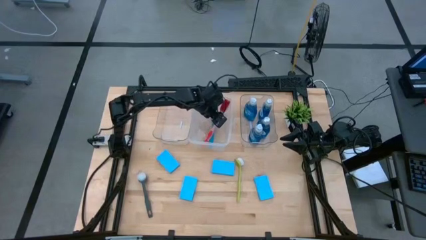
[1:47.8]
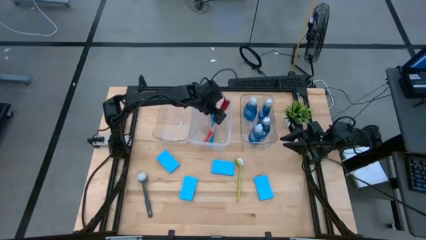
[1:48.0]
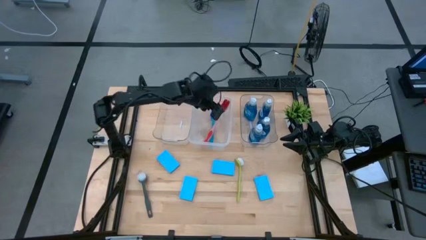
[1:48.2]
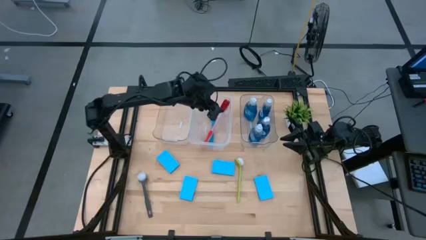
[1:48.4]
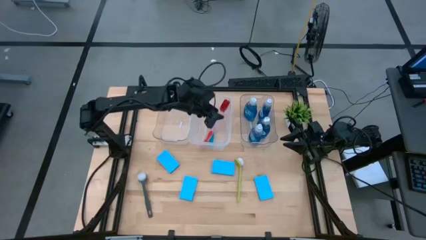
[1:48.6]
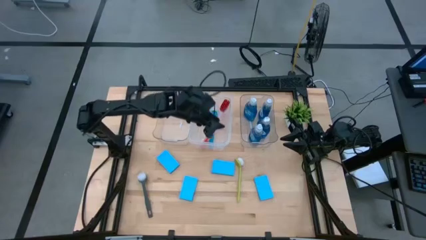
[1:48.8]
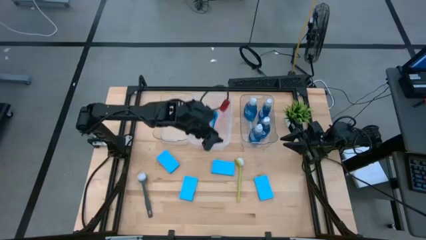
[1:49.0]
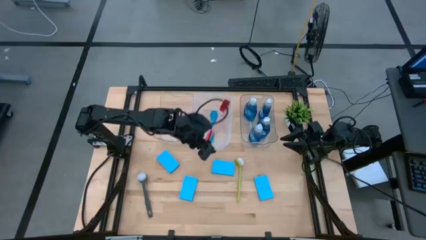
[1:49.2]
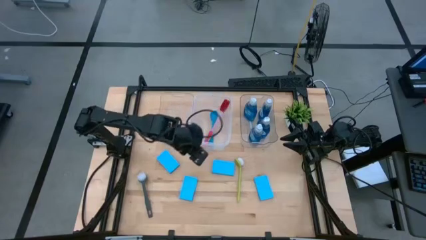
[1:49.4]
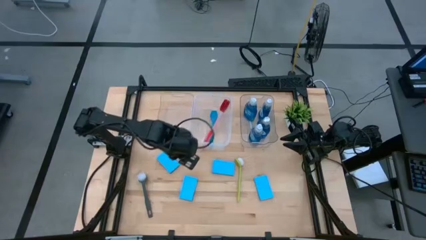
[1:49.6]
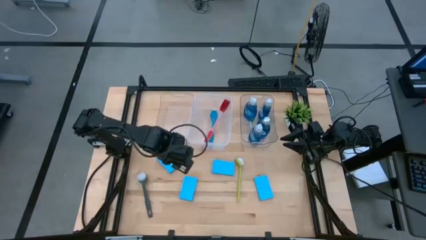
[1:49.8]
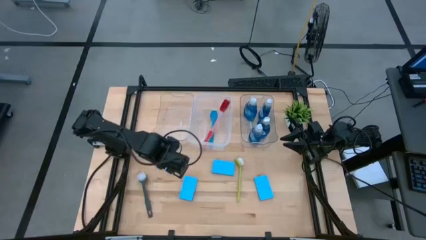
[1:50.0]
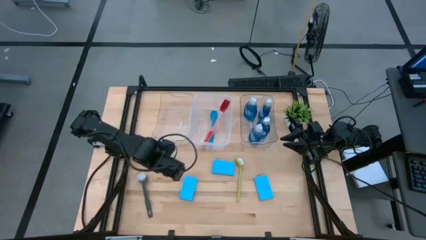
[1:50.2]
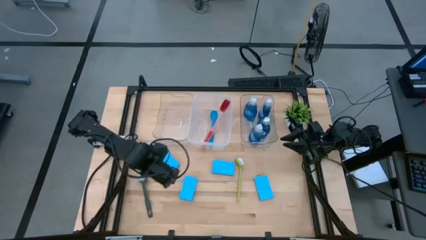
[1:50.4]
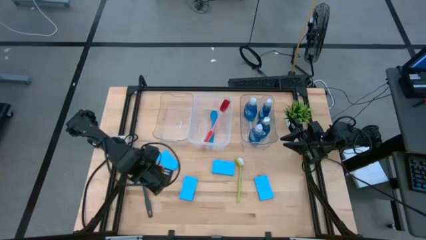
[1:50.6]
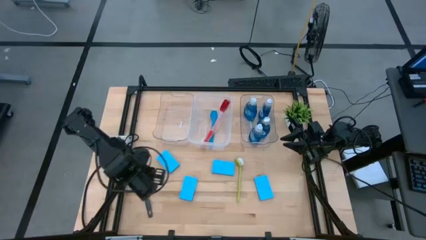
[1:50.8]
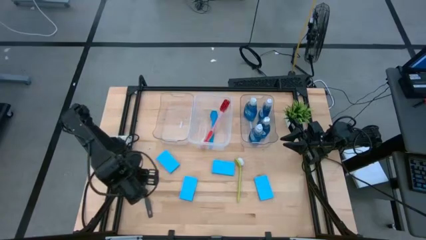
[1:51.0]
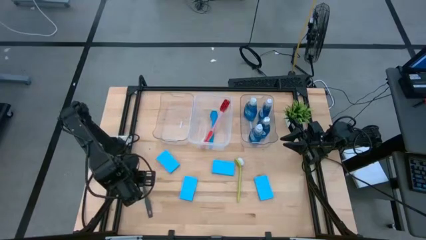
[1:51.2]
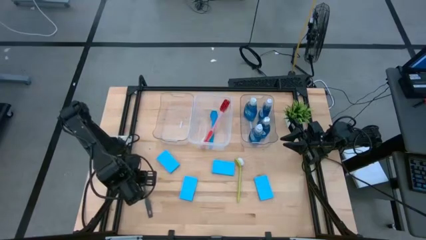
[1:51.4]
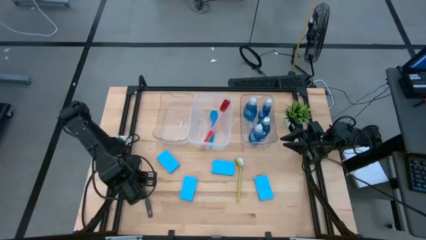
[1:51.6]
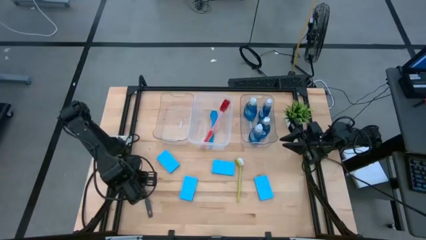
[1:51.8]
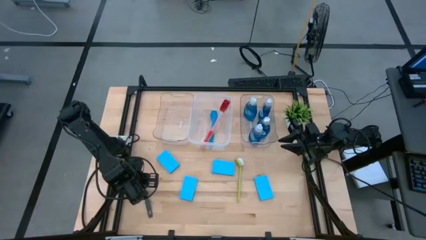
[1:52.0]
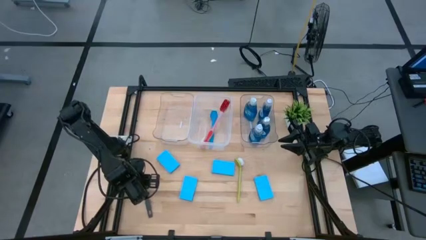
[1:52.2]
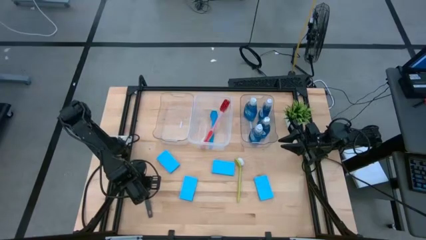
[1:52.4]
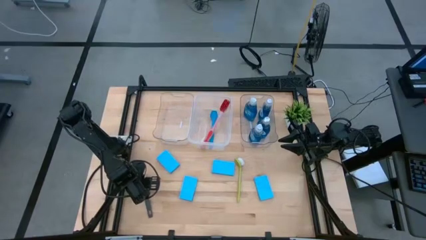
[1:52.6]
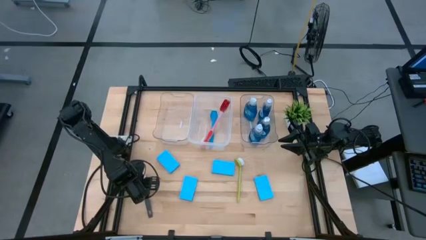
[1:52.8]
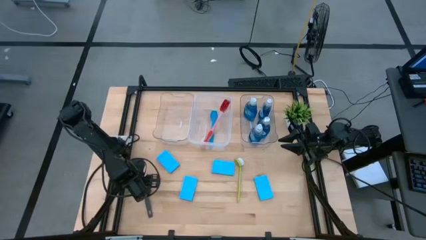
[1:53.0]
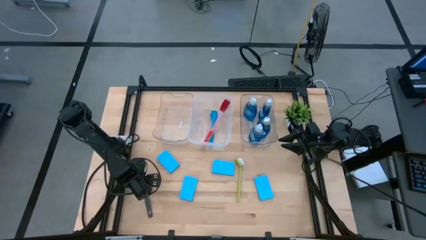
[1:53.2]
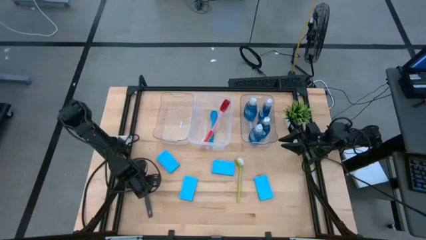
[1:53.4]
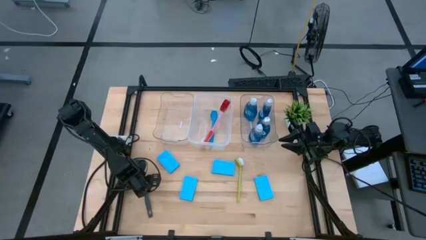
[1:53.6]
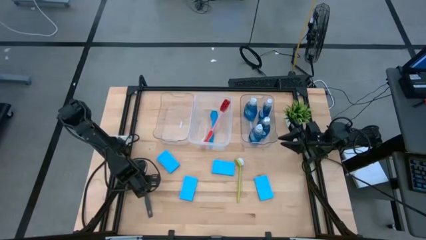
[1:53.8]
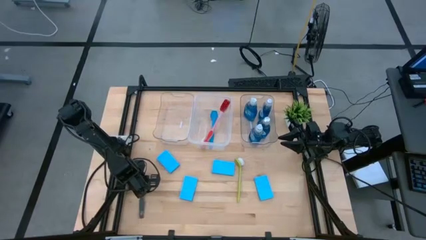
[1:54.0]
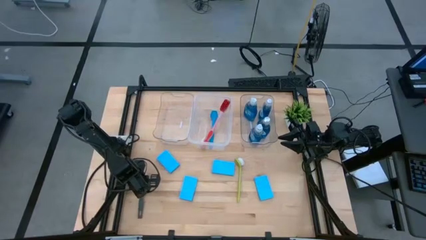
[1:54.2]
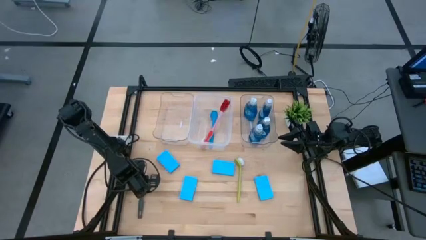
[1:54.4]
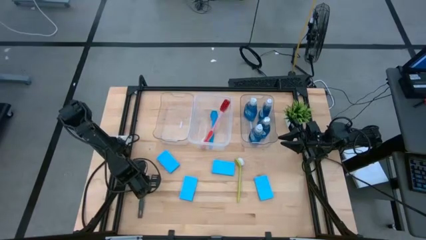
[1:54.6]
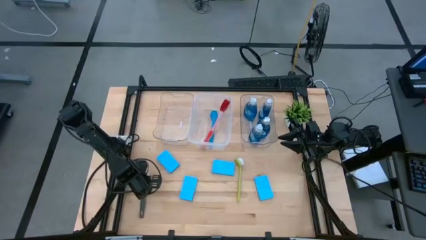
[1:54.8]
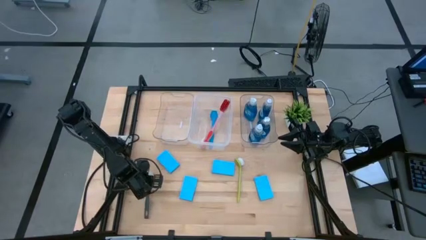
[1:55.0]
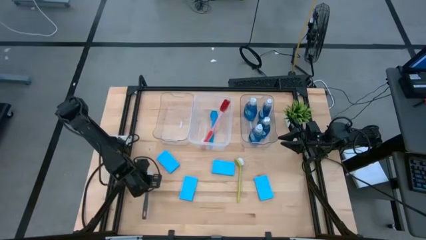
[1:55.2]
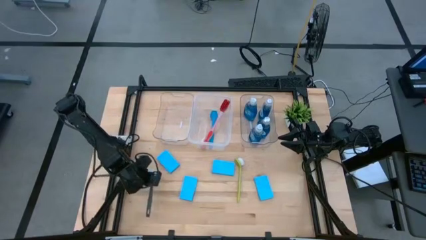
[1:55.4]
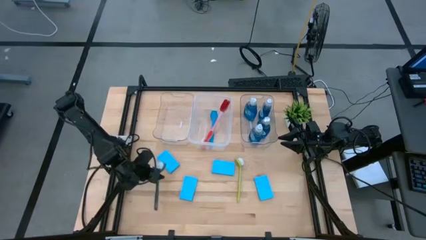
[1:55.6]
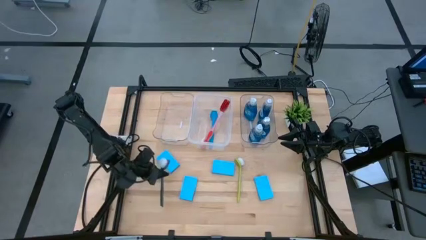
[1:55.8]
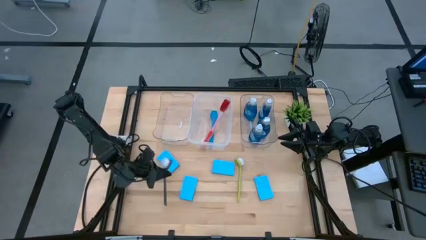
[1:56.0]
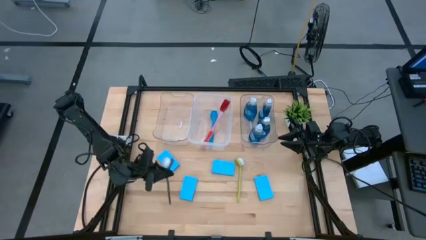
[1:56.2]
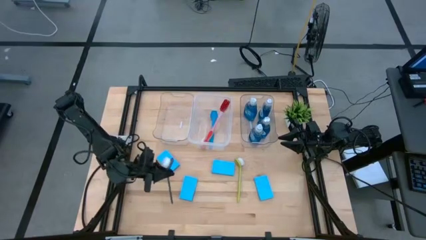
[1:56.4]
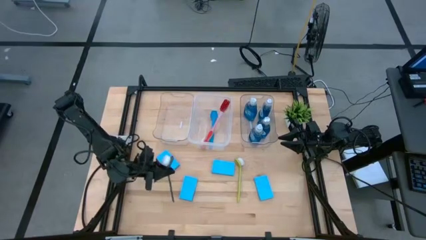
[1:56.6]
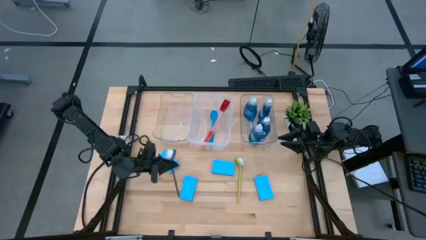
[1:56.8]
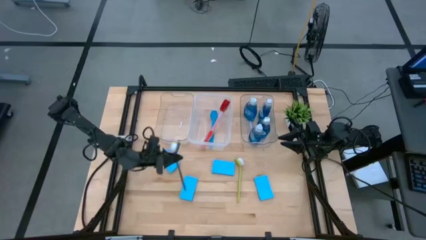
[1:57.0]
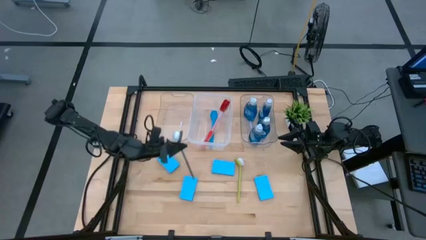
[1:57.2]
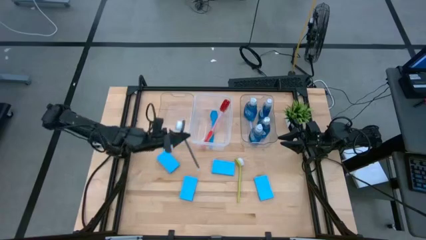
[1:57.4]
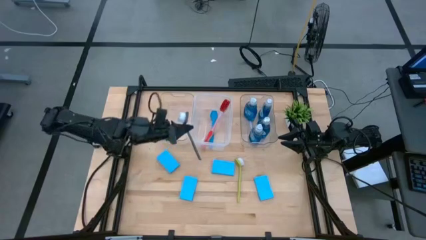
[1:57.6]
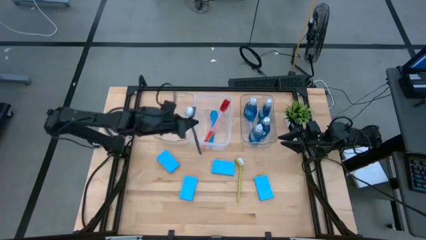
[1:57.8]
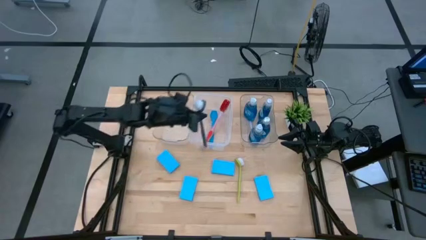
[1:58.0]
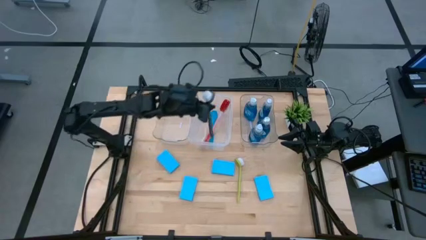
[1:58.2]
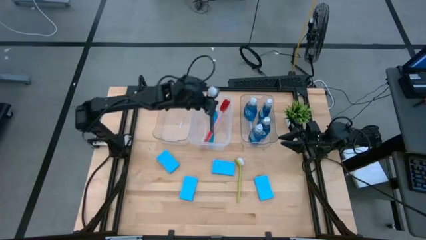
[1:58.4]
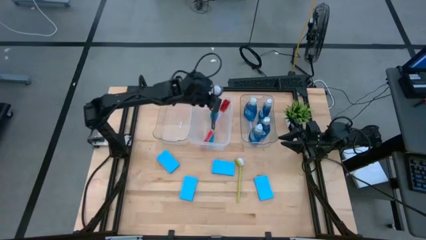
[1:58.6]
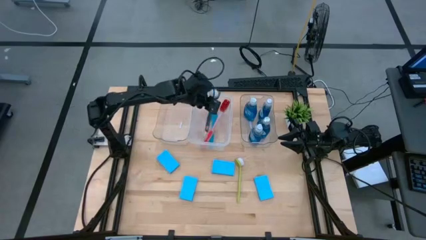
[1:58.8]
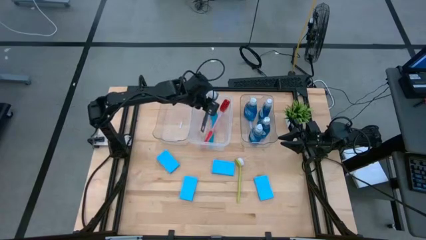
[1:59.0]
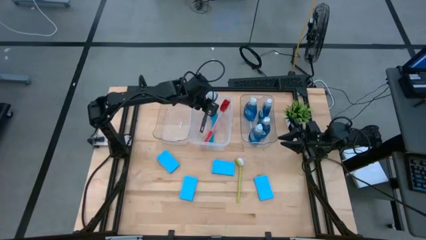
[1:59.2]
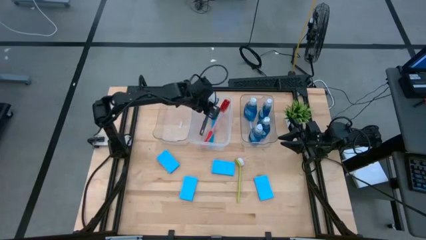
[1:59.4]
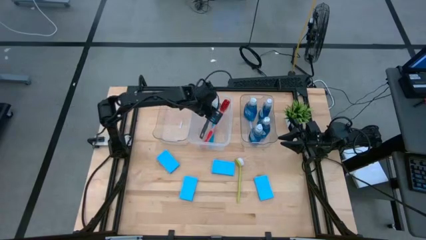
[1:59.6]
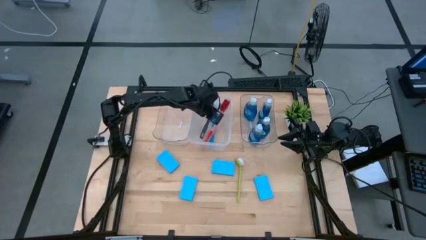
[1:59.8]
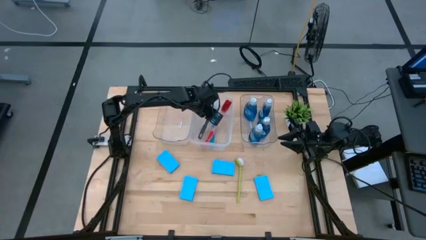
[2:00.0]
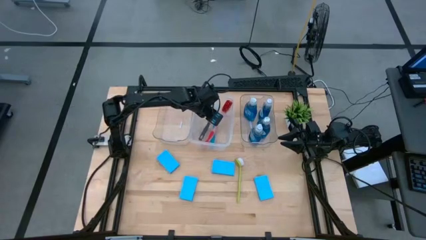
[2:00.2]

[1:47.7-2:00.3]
Task: Pick & Place Kitchen Sink Supplies
Put the grey toilet brush into the middle transparent bin
